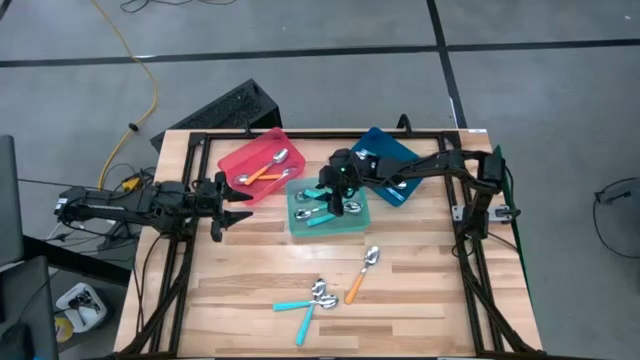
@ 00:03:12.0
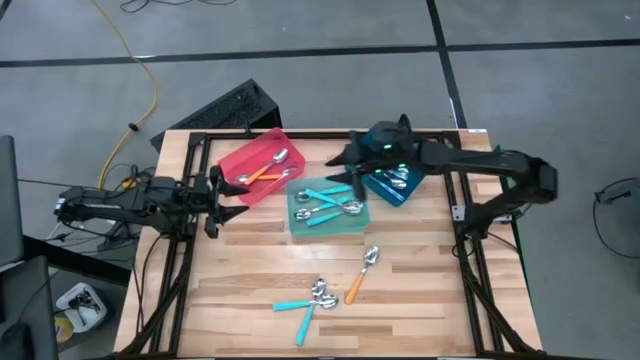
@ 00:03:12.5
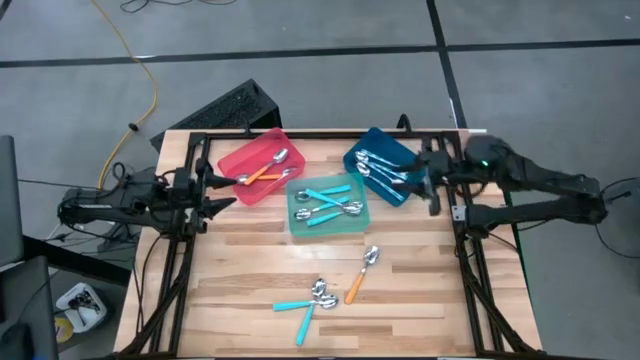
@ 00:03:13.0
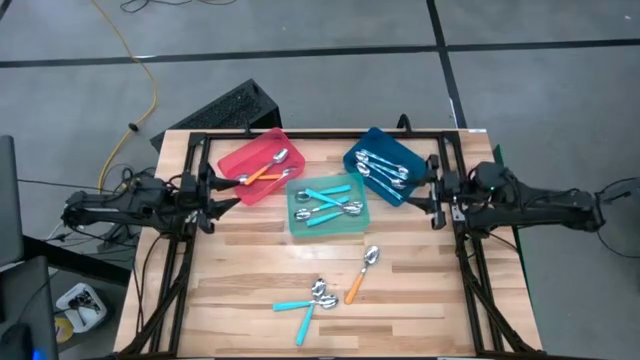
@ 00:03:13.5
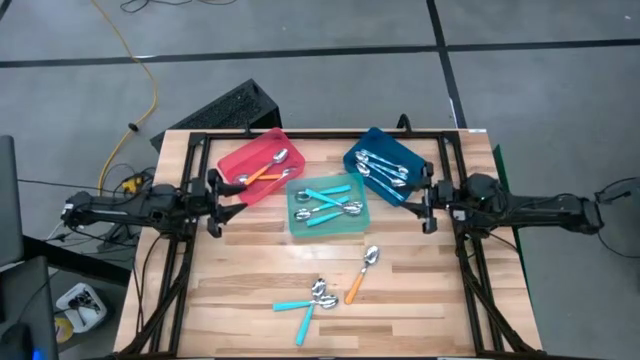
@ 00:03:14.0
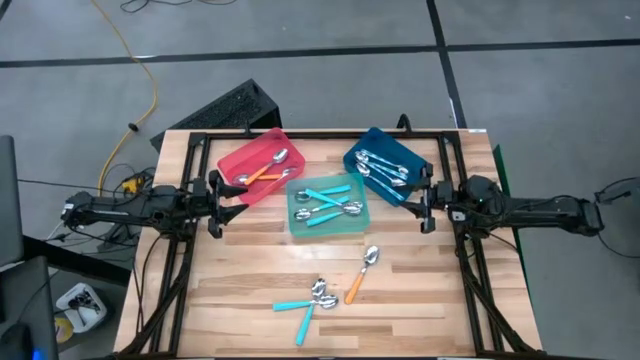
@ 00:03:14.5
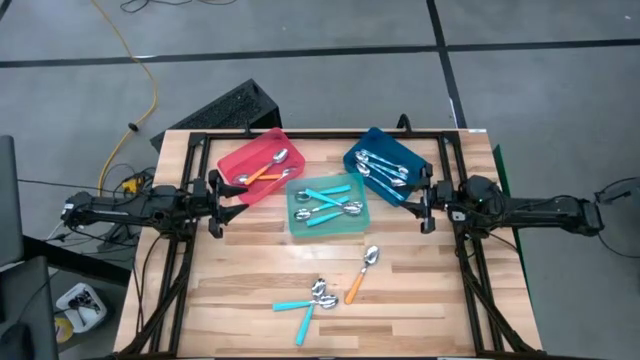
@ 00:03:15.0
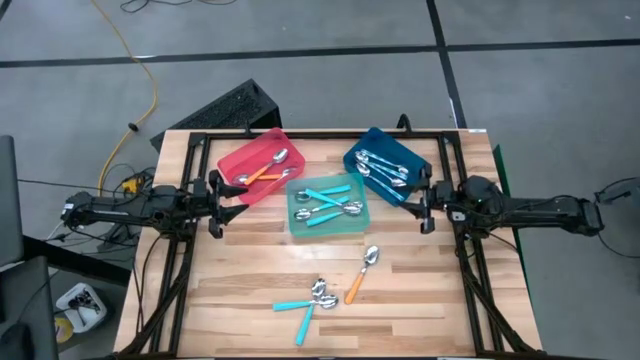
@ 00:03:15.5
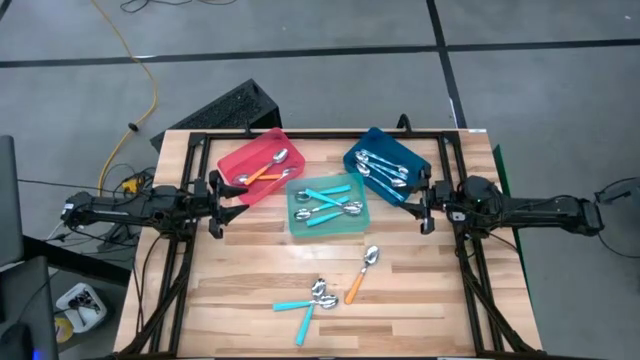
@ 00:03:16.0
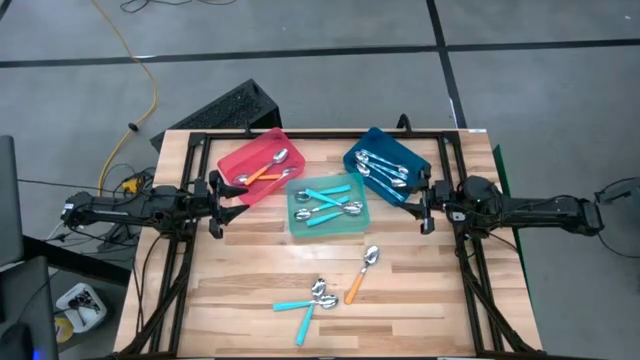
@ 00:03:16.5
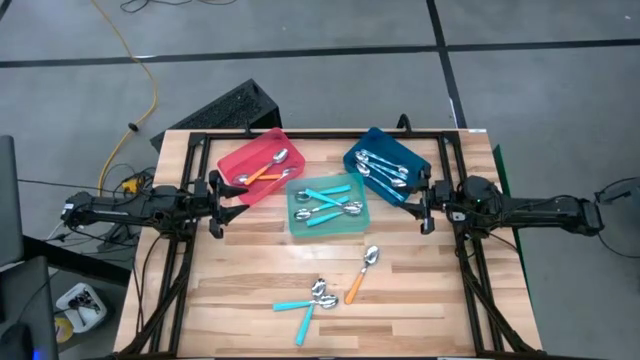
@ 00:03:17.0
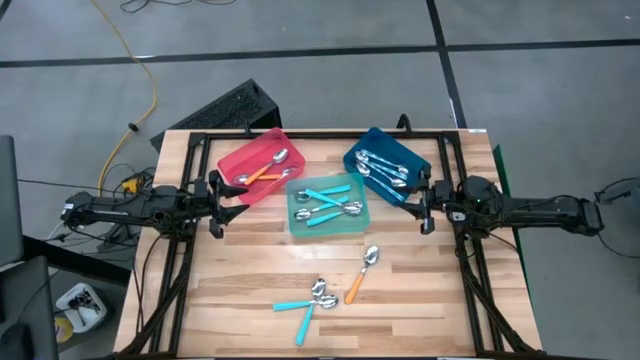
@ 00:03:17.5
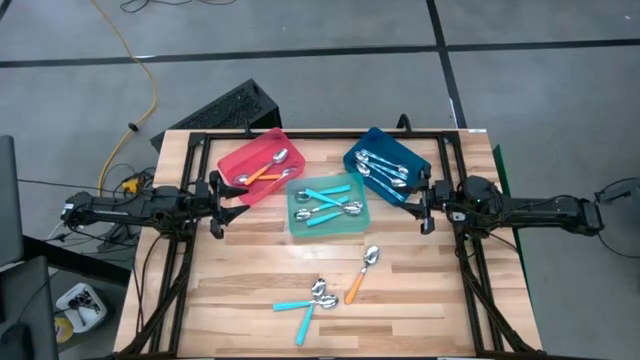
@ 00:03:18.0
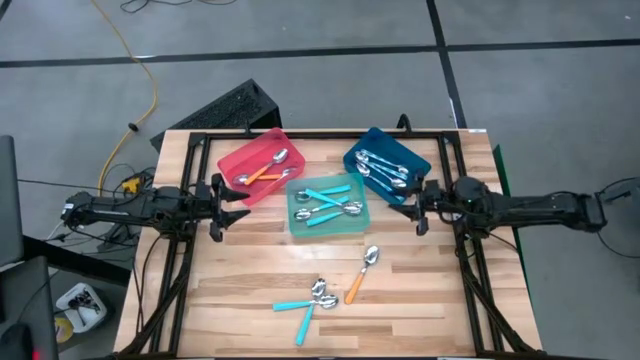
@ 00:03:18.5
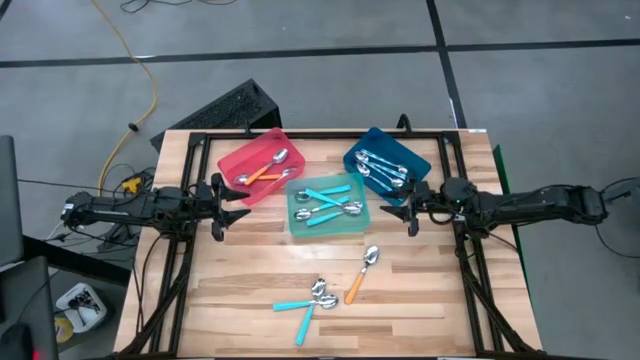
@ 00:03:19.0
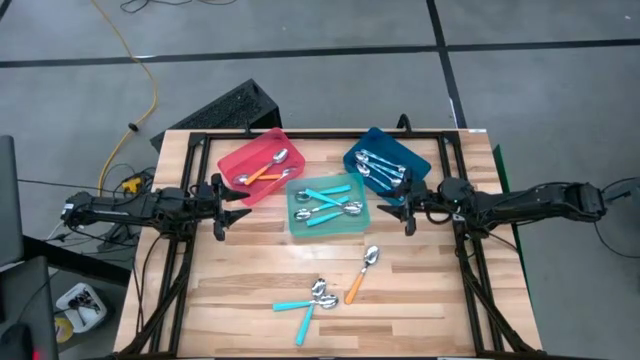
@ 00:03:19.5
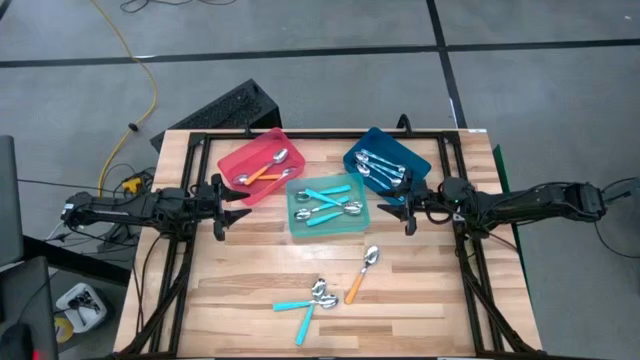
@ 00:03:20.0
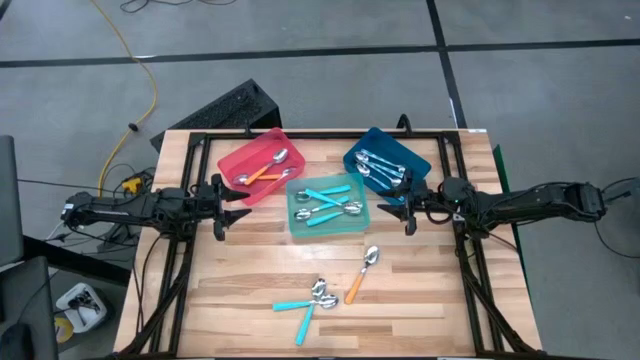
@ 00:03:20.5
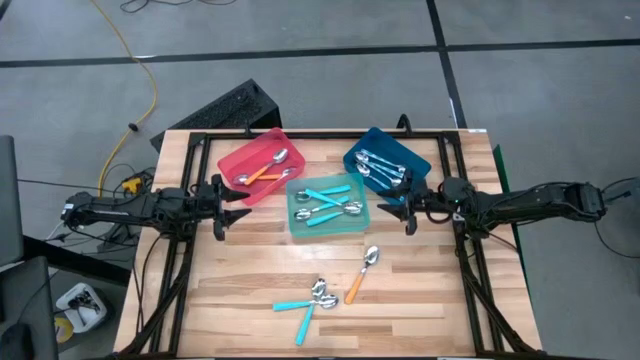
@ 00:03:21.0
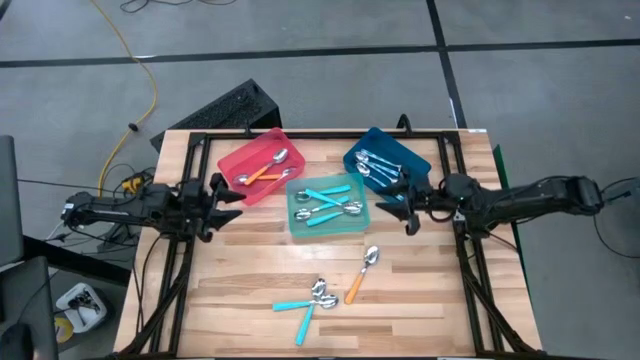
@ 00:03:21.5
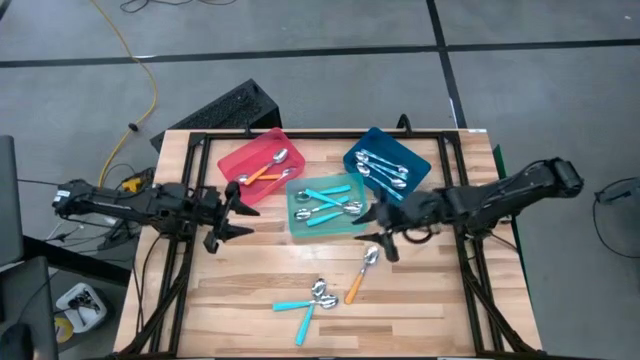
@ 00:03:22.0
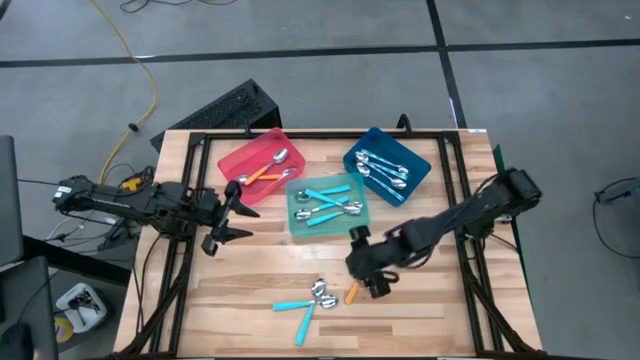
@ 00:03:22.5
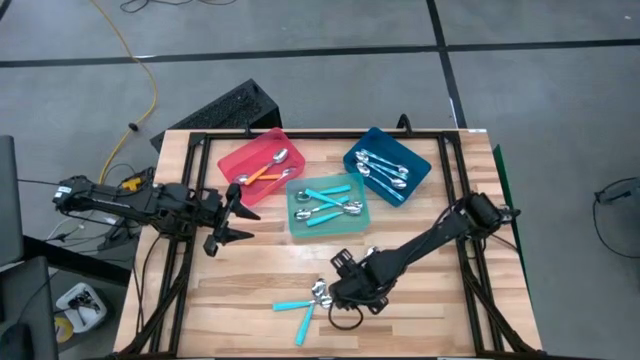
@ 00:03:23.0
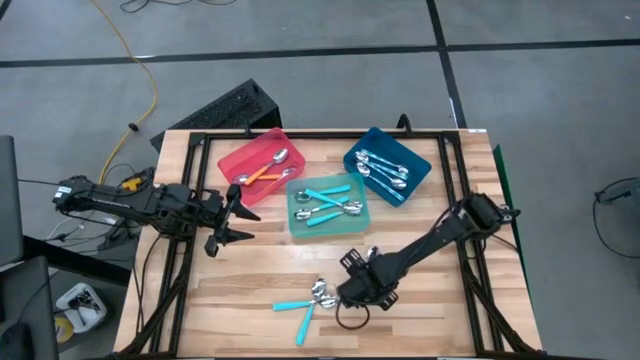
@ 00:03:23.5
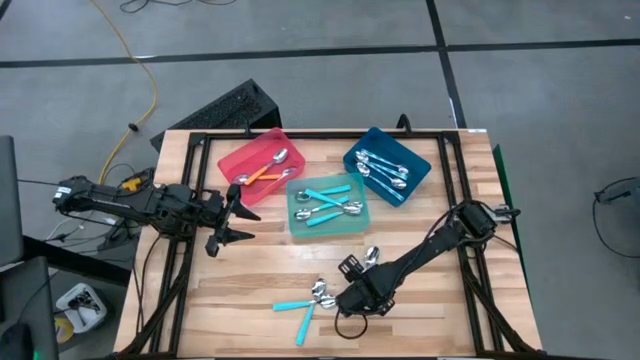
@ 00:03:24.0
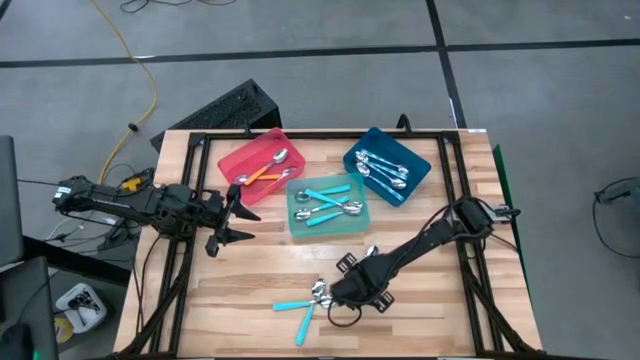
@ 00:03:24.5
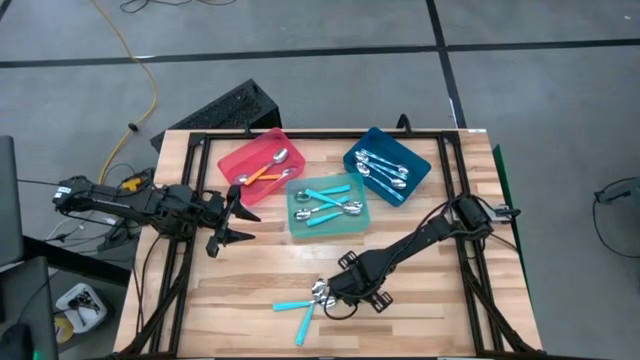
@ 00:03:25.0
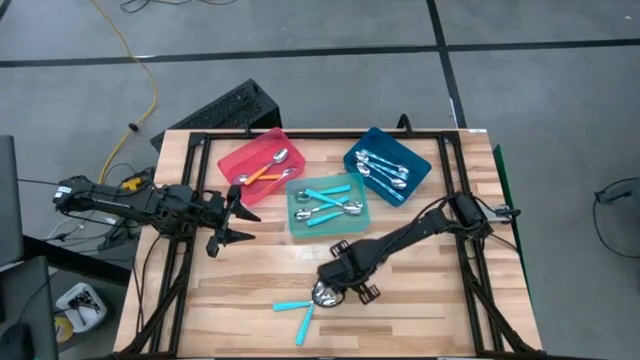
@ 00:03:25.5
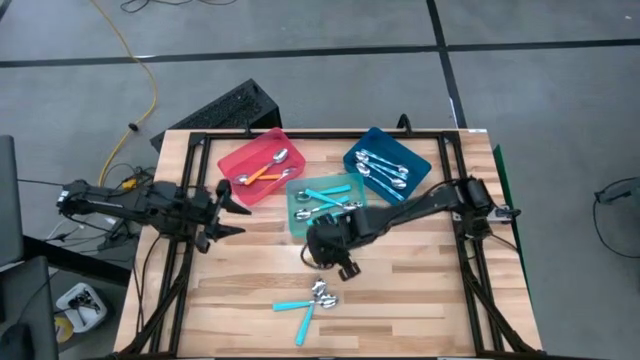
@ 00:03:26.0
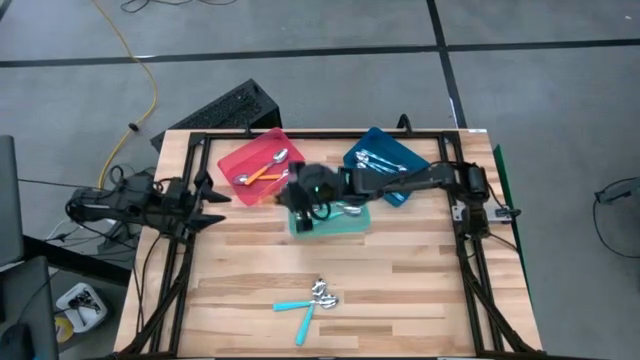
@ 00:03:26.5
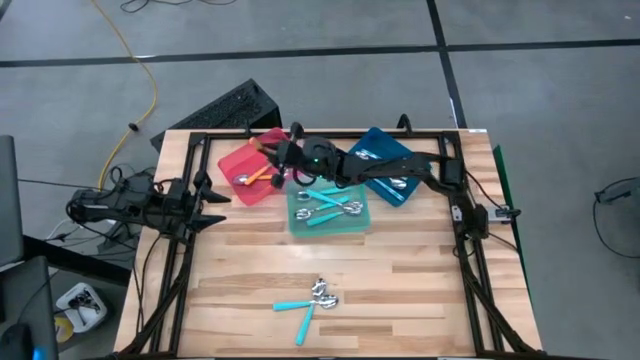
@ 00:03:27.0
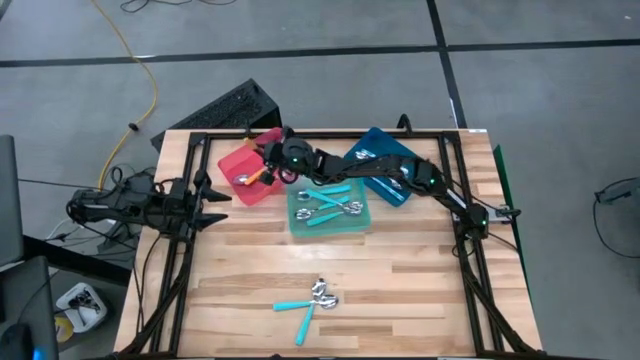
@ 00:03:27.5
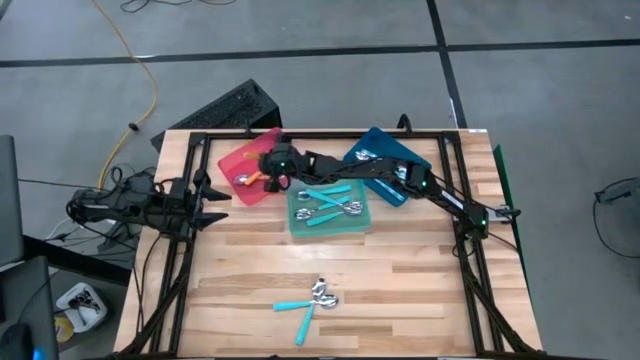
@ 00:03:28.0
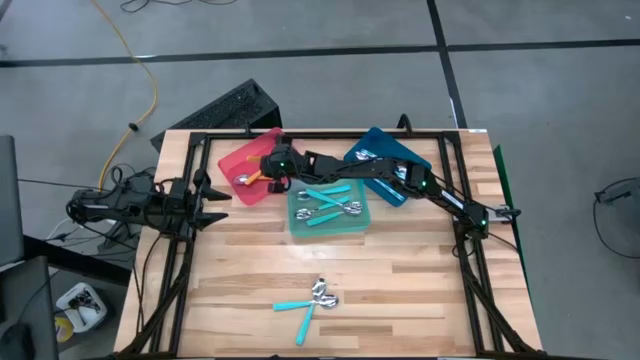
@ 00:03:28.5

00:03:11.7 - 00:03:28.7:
Task: Sort silverware by color (type)
Put the orange spoon into the red bin

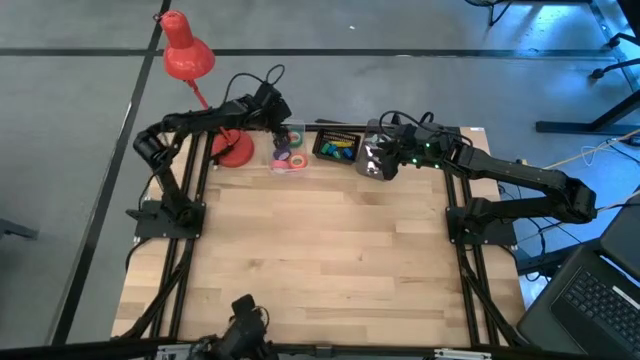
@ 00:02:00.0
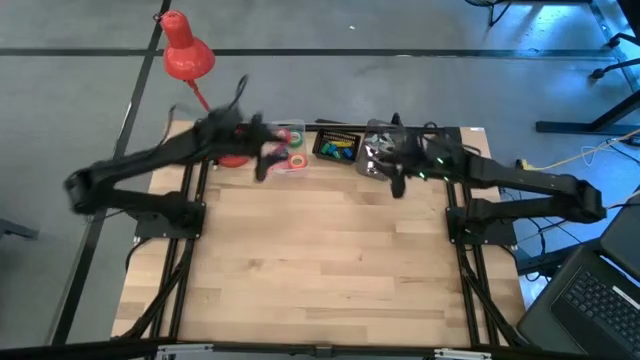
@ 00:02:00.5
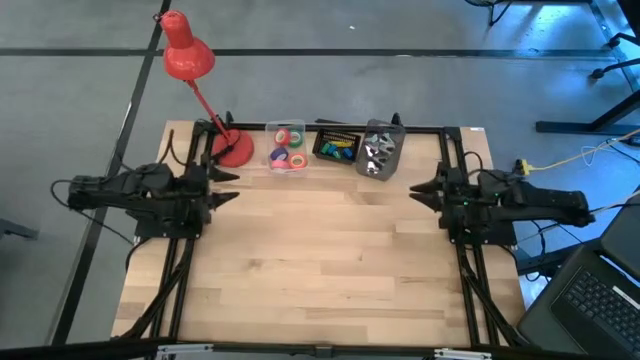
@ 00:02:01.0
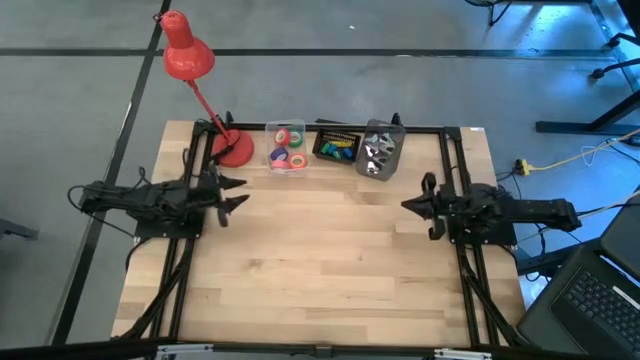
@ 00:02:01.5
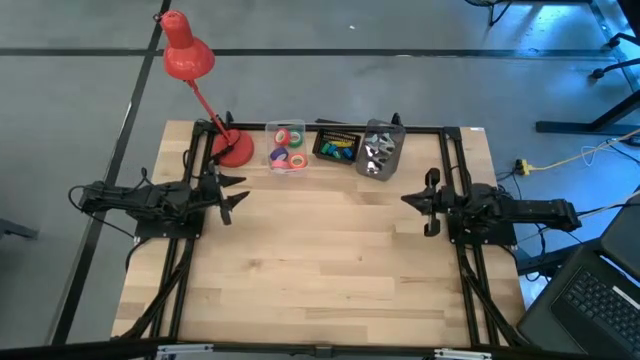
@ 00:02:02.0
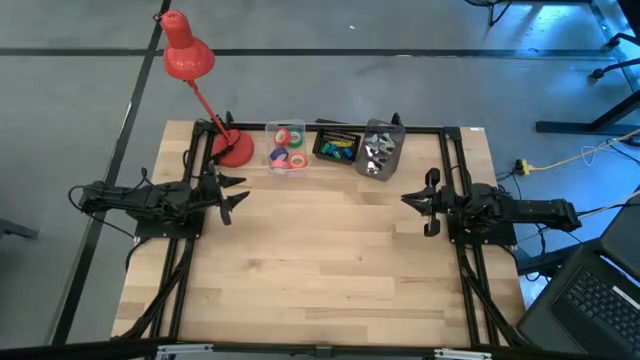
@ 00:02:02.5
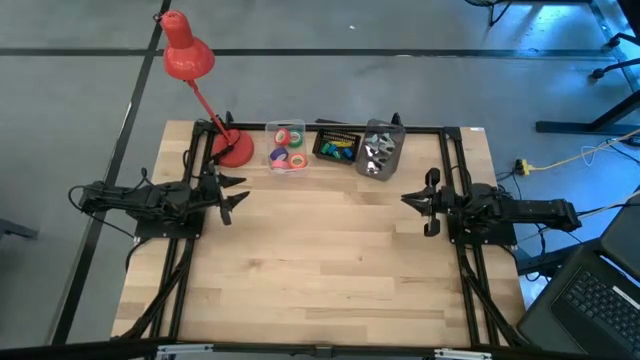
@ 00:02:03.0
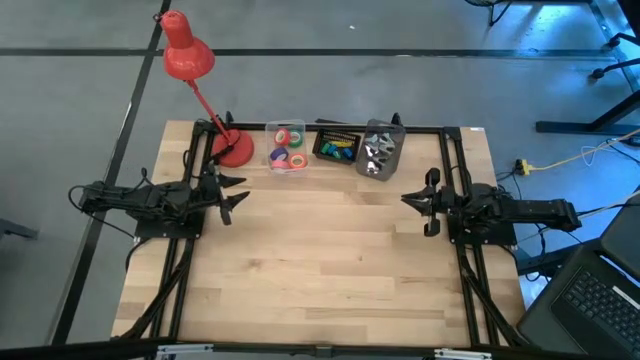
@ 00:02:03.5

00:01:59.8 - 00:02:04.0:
Task: Pick and place Stapler, Stapler remover, tape
Return to Home Position
